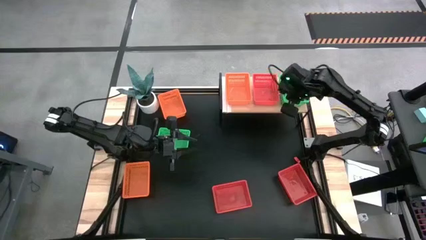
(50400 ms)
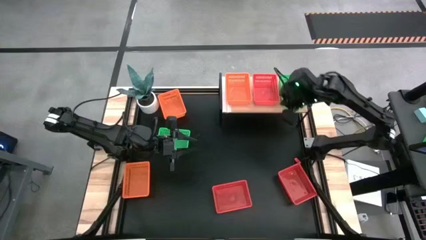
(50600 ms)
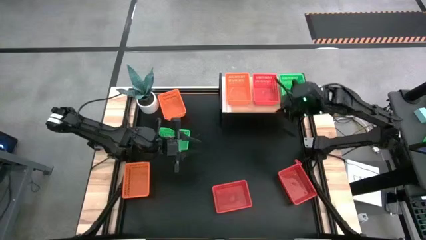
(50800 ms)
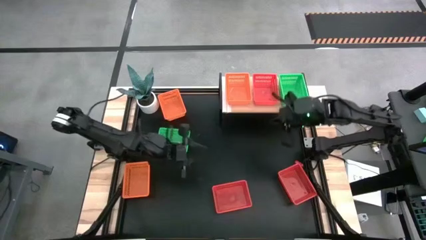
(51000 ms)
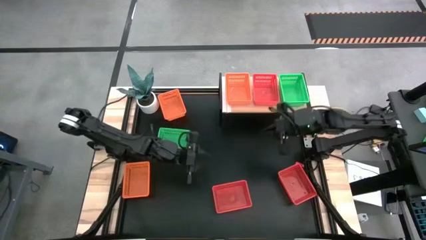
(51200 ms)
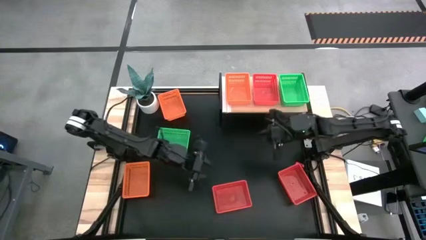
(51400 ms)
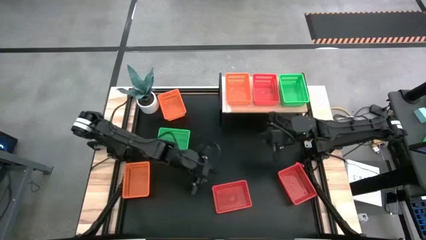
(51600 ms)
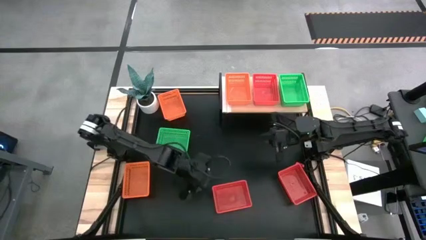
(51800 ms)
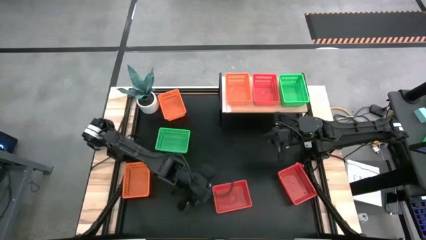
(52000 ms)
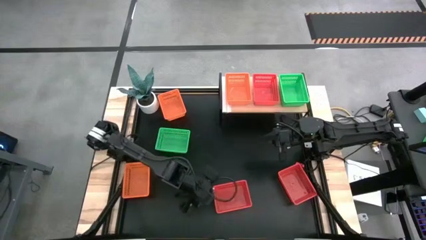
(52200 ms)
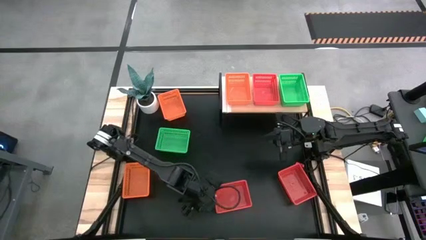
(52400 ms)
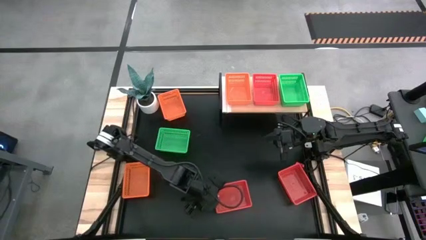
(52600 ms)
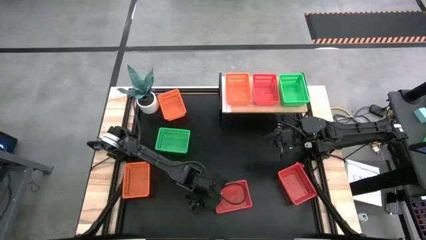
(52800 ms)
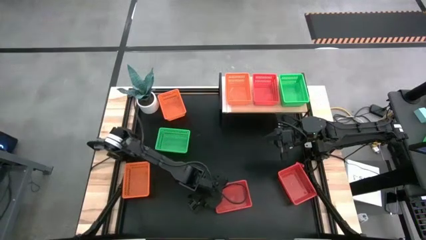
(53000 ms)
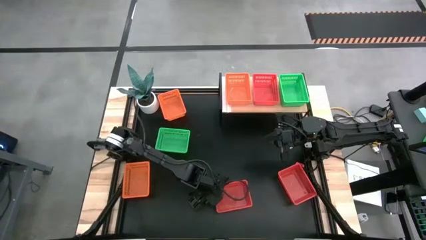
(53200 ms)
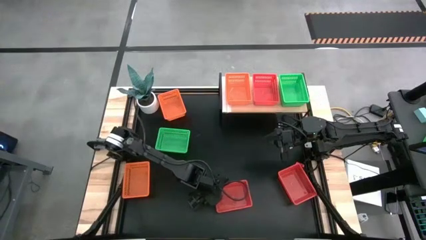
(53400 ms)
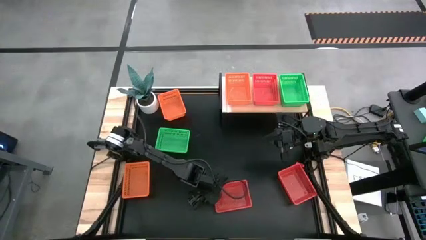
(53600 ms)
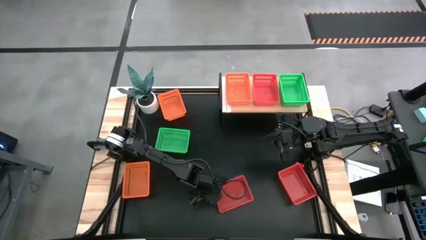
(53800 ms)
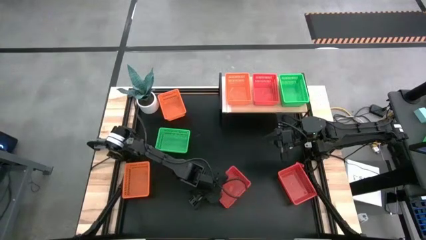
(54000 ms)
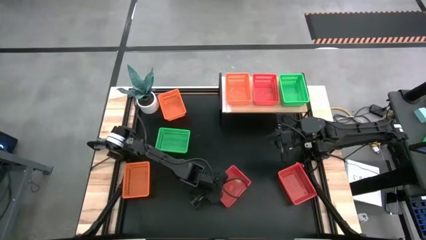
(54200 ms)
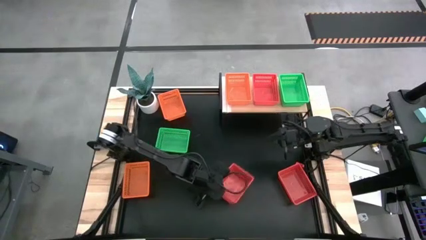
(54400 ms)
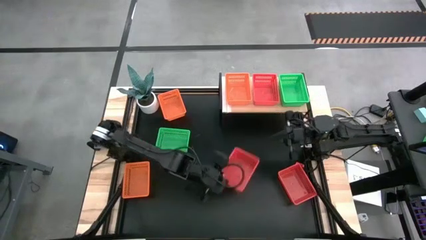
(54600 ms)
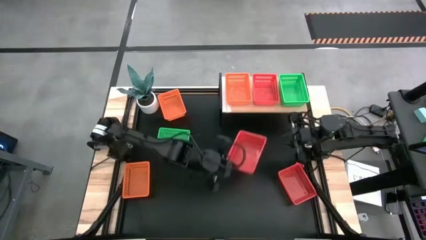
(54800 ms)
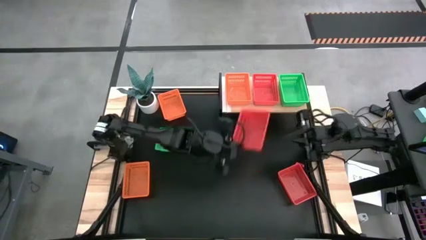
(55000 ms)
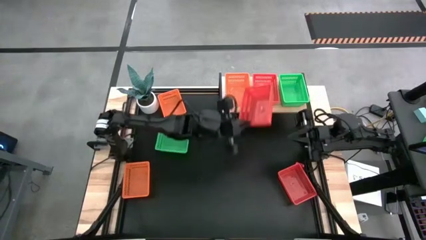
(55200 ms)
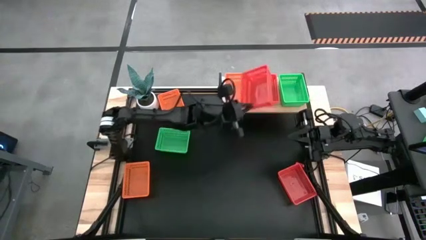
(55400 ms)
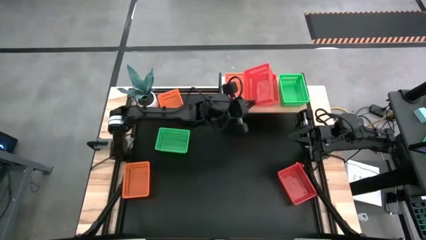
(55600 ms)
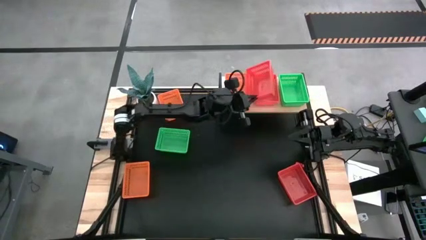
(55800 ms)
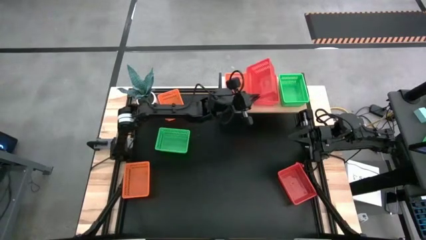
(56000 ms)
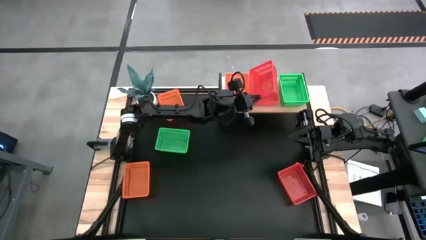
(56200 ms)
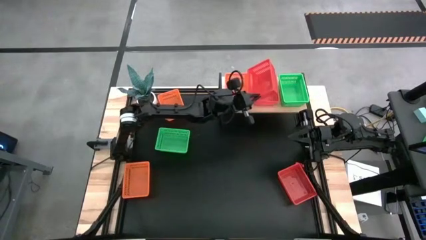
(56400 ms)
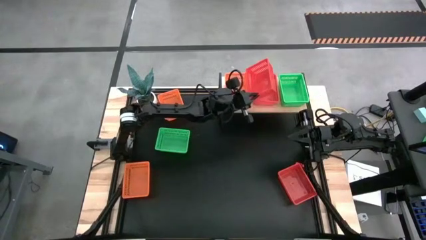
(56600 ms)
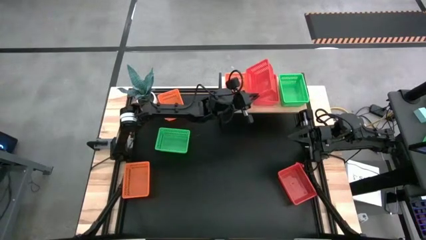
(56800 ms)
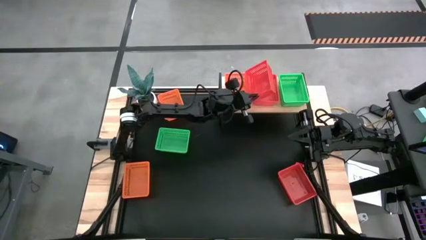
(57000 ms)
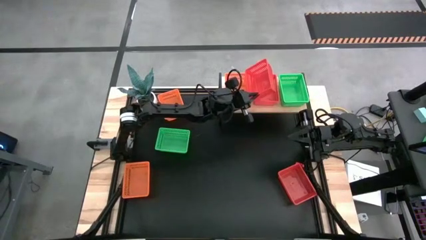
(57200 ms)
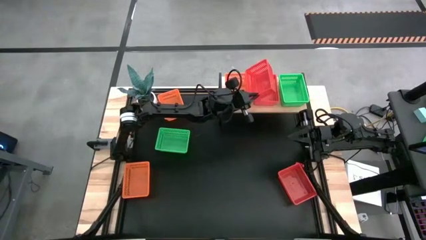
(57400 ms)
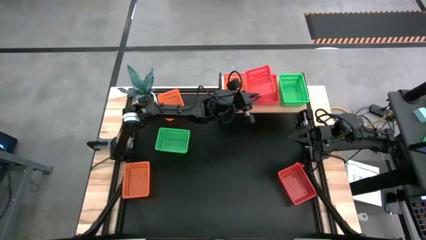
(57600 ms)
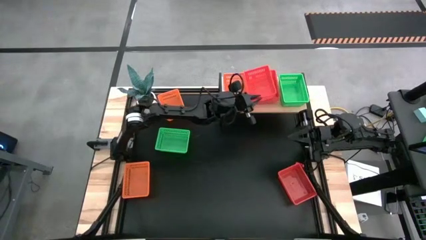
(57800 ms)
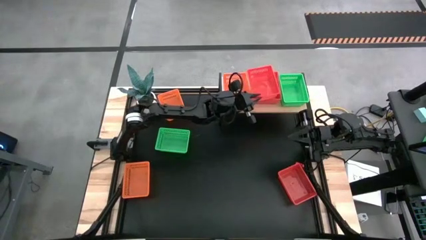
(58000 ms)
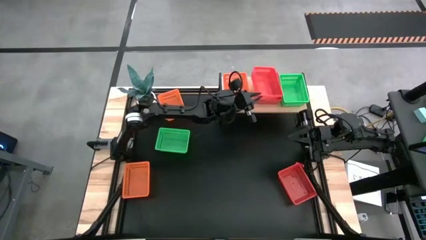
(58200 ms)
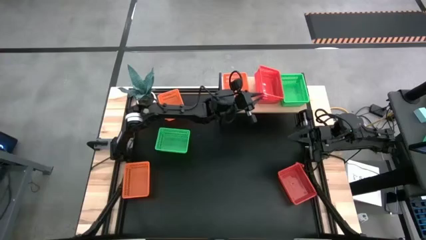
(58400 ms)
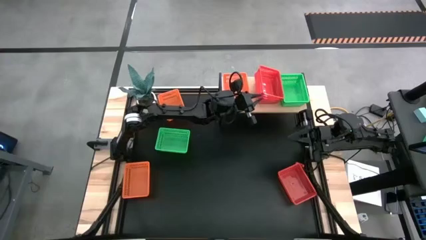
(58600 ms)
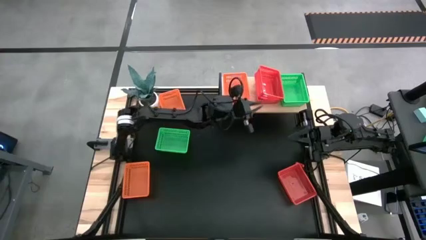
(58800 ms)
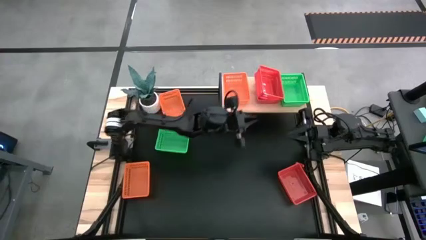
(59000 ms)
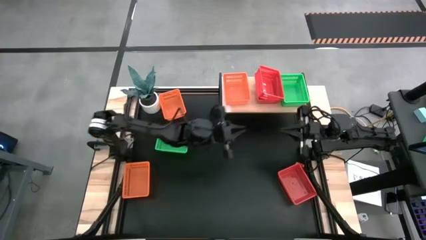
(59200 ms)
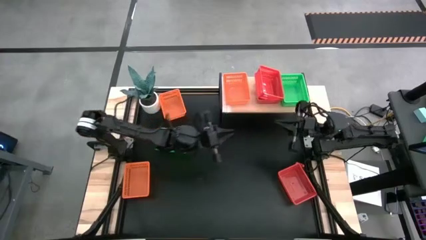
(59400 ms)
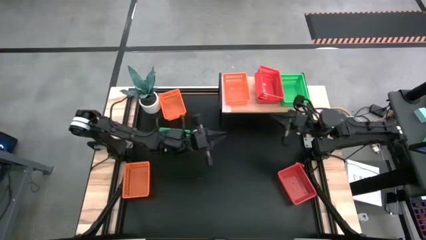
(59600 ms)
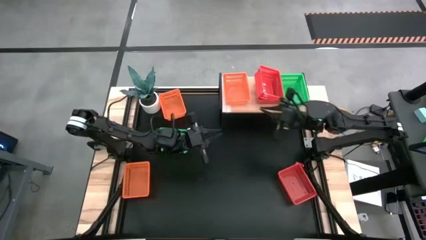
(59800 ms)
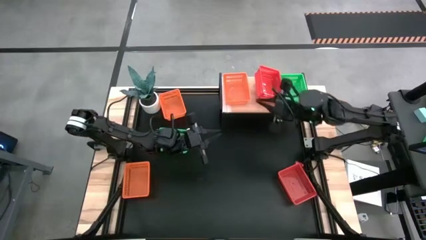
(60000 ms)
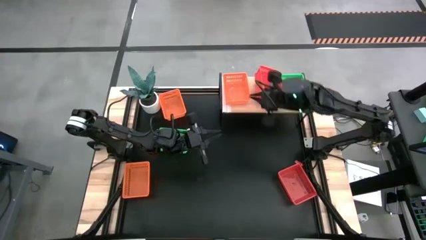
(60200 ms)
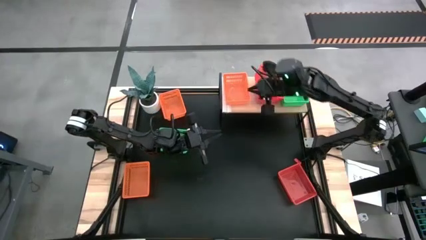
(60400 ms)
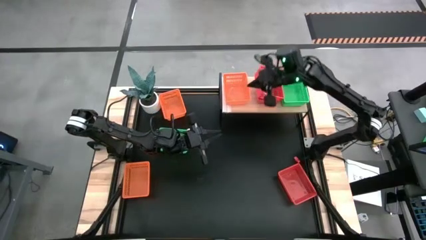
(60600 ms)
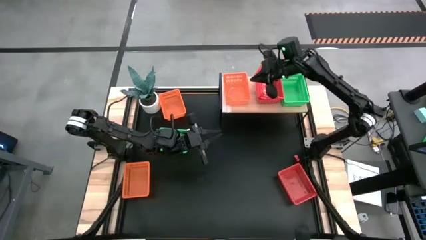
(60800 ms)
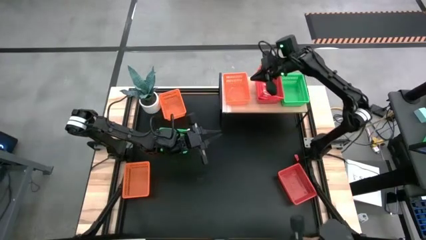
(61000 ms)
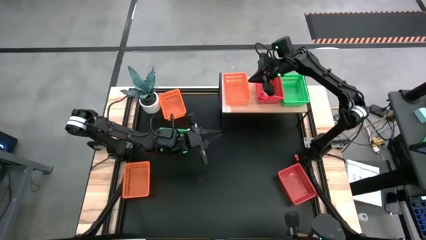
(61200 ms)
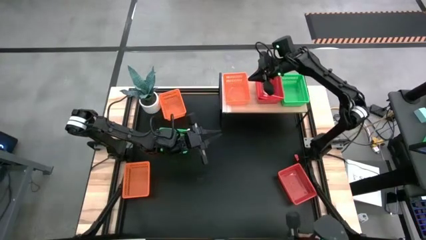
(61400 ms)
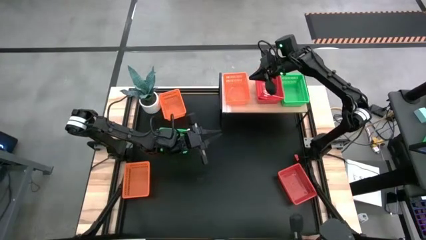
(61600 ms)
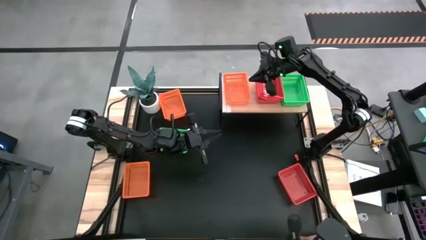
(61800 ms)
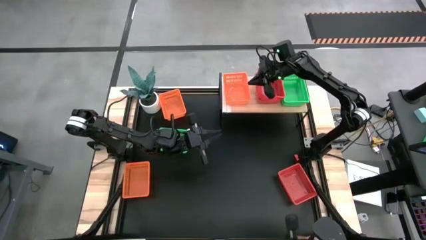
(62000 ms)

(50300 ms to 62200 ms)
Task: Stack baskets on shelf by color
Stack the left red bin on the other red bin on the shelf
